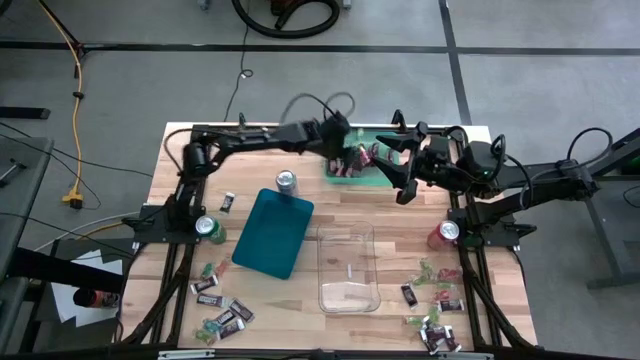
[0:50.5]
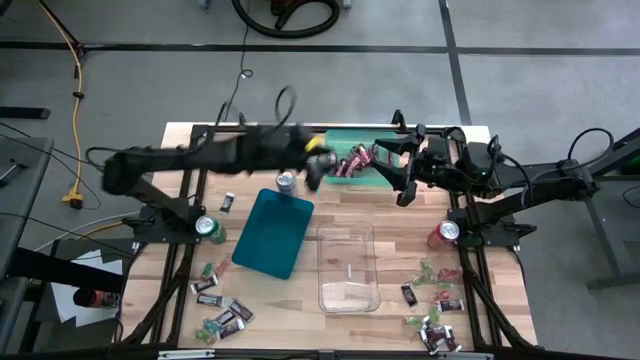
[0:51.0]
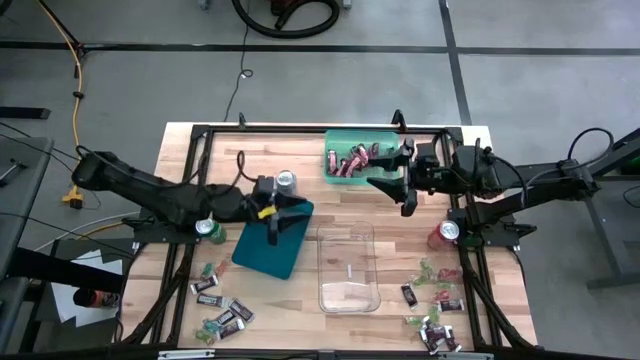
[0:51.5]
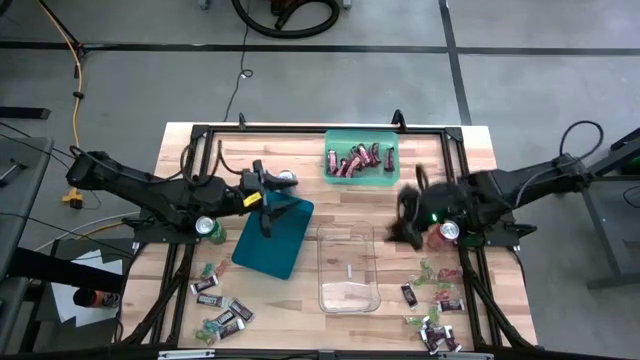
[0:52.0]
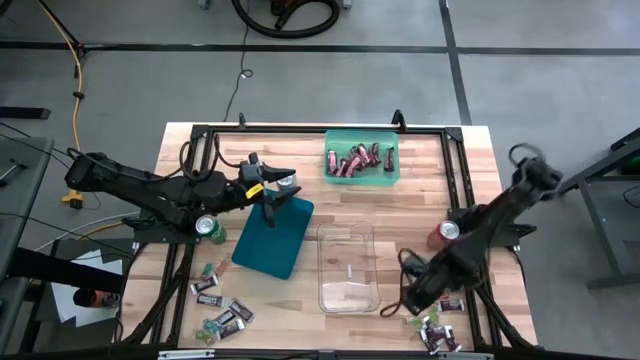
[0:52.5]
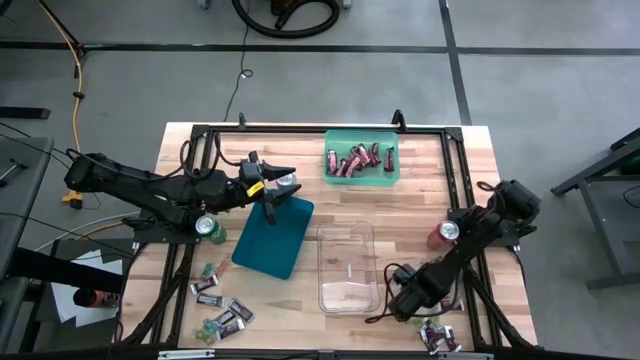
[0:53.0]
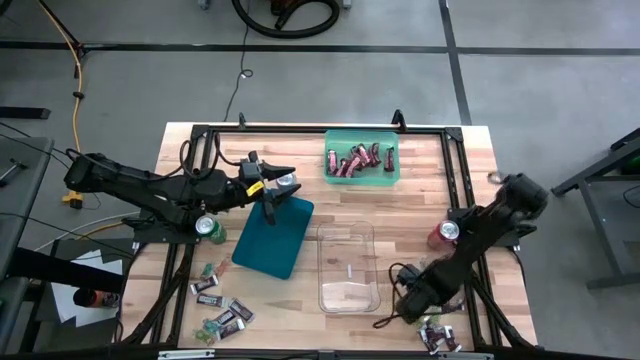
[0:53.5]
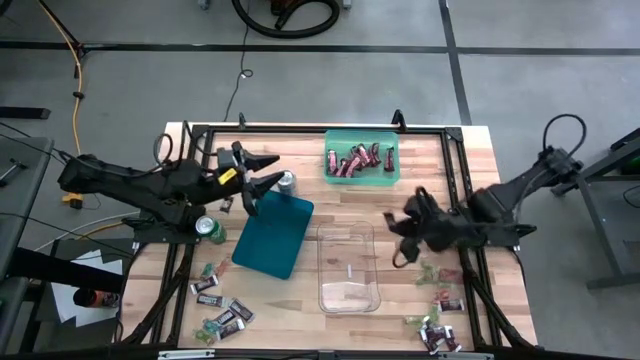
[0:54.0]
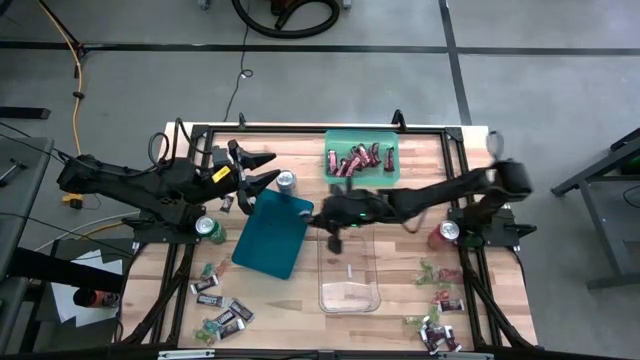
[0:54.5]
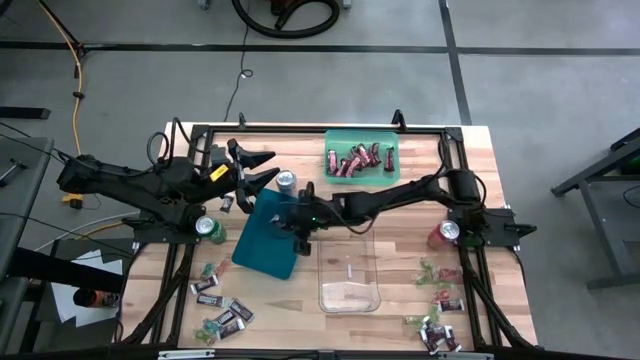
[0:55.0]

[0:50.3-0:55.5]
Task: Sort candy
Put the chocolate bar into the blue bin

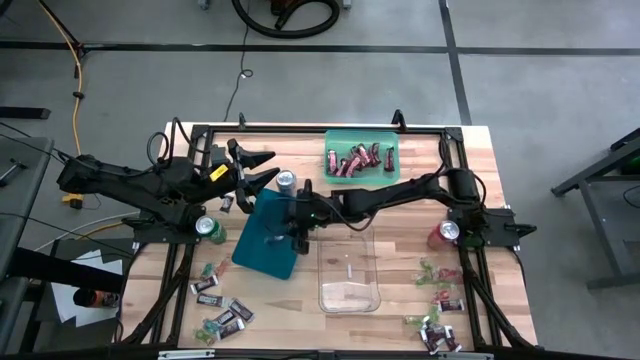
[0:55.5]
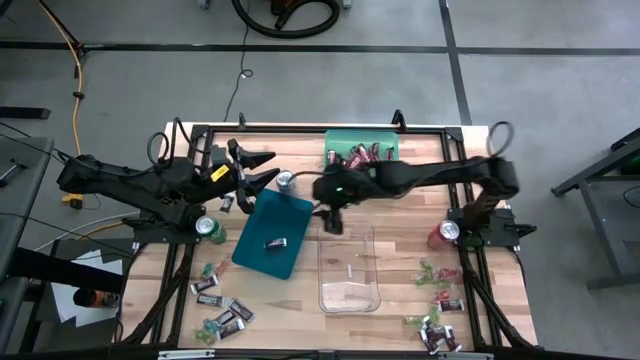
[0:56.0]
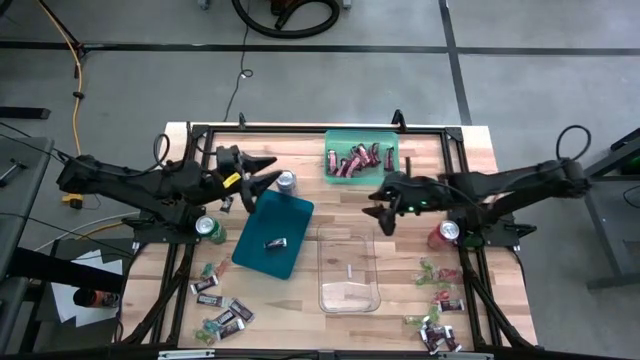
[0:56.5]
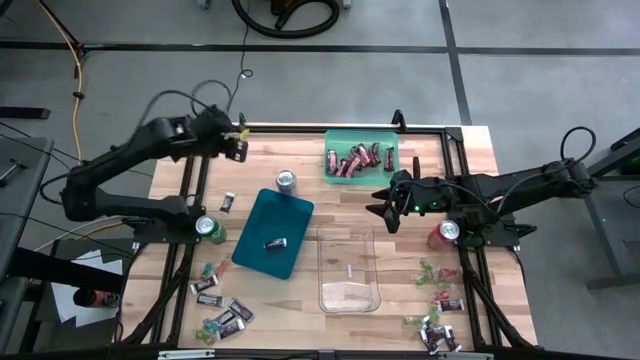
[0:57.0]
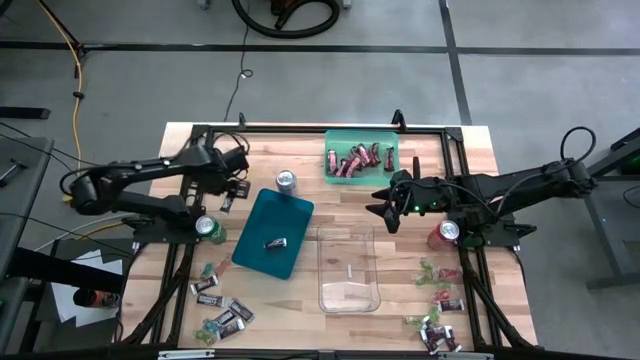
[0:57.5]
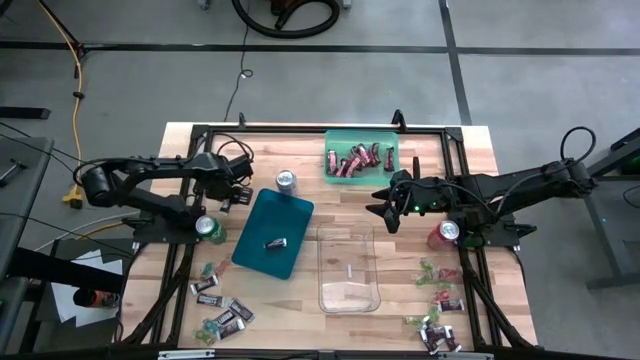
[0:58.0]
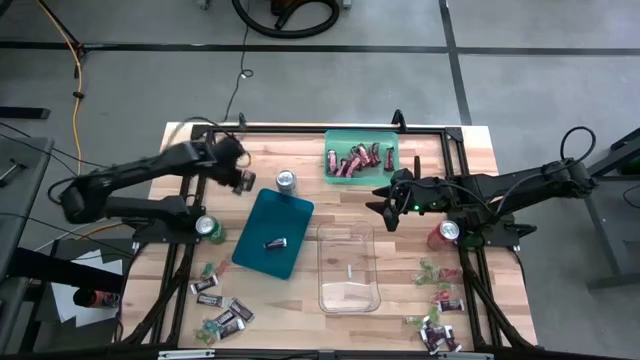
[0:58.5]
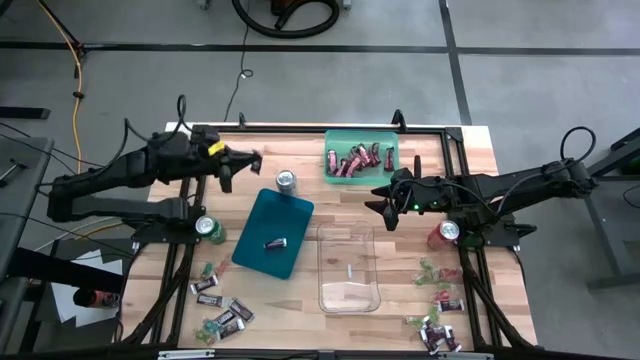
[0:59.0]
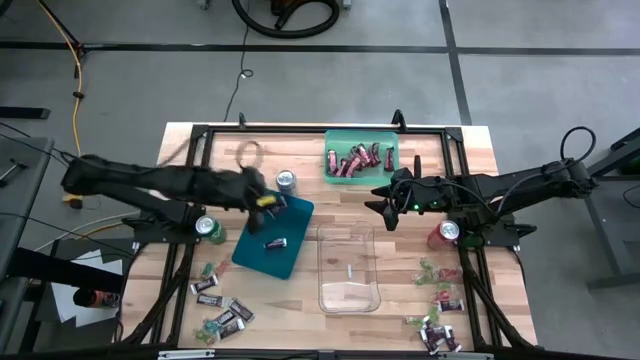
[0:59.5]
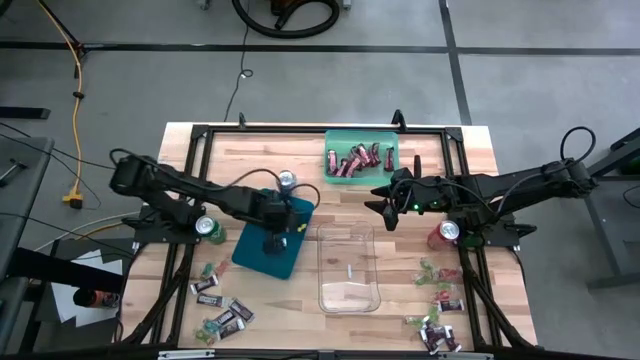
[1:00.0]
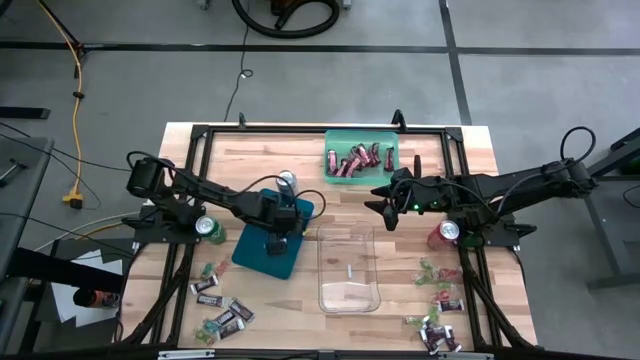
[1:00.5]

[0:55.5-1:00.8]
Put the chocolate bar into the blue bin

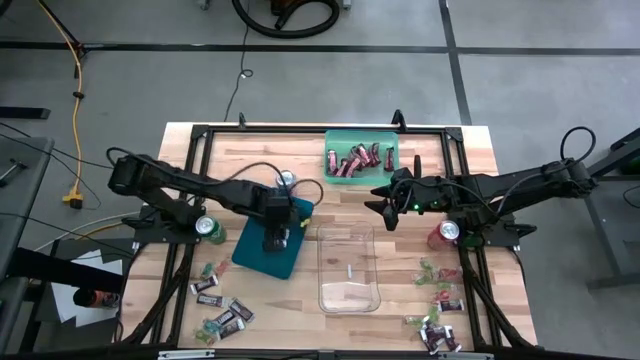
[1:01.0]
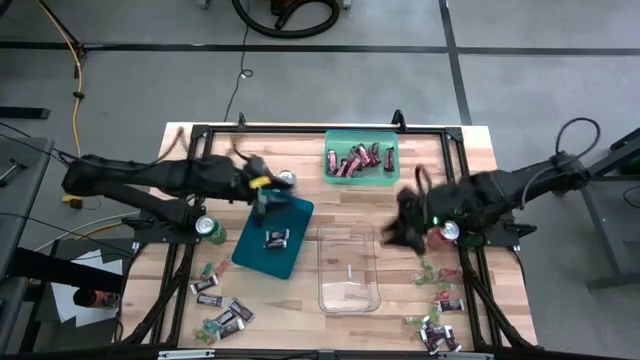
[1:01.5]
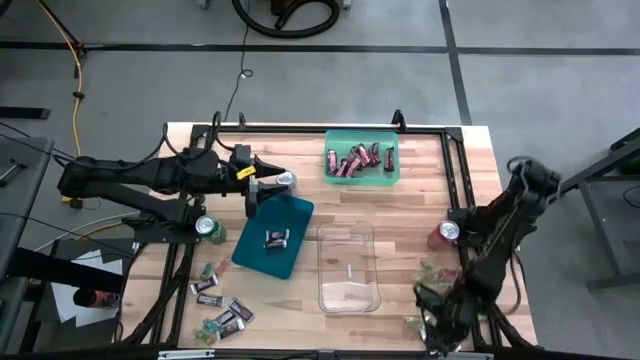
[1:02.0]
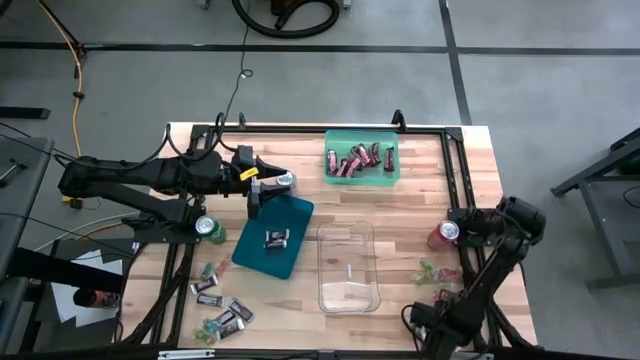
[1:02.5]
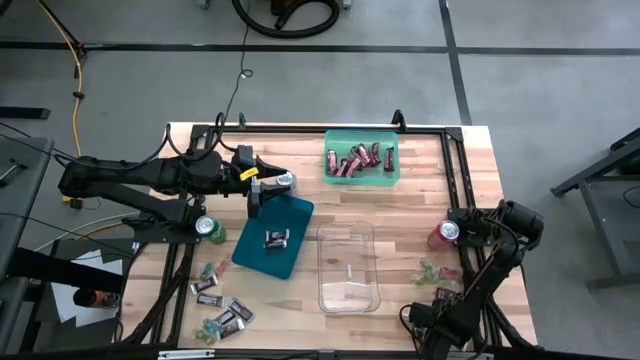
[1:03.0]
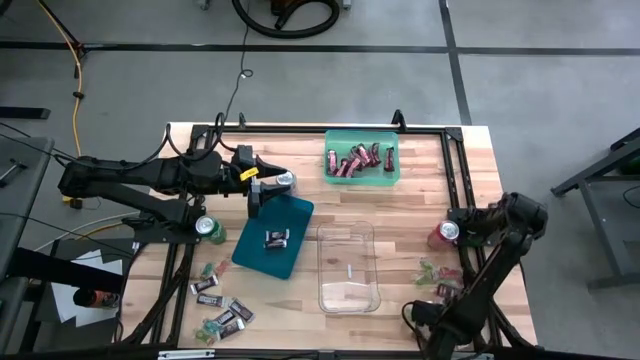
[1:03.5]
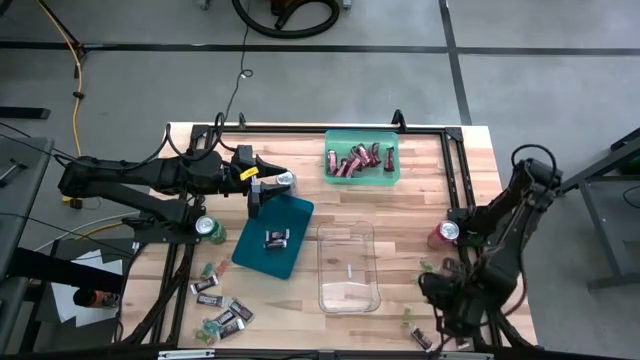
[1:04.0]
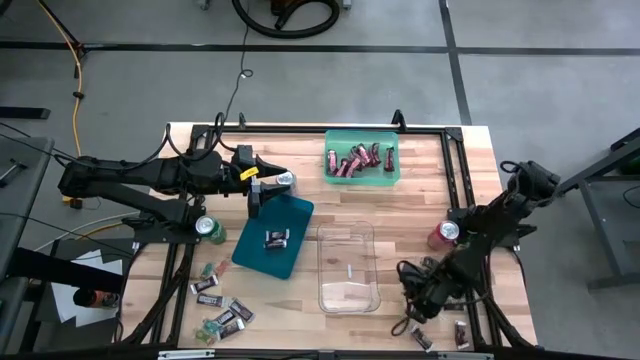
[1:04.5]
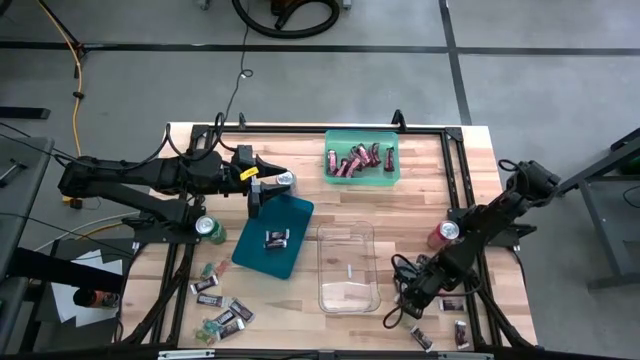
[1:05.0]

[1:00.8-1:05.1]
Put the chocolate bar into the blue bin

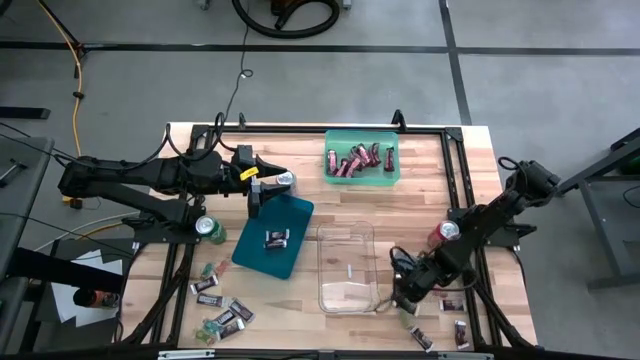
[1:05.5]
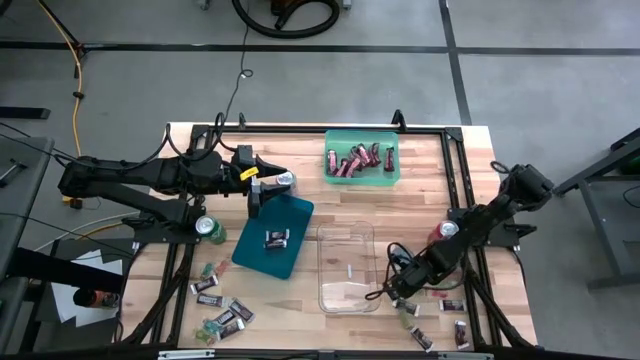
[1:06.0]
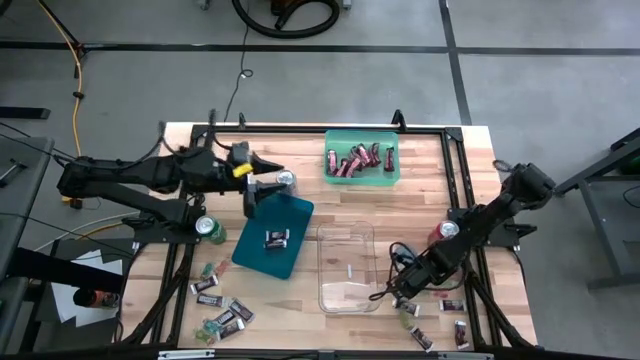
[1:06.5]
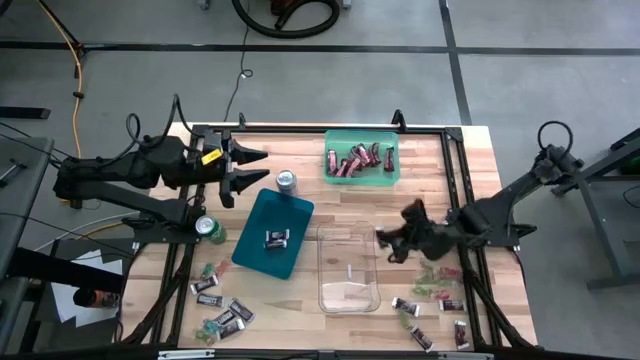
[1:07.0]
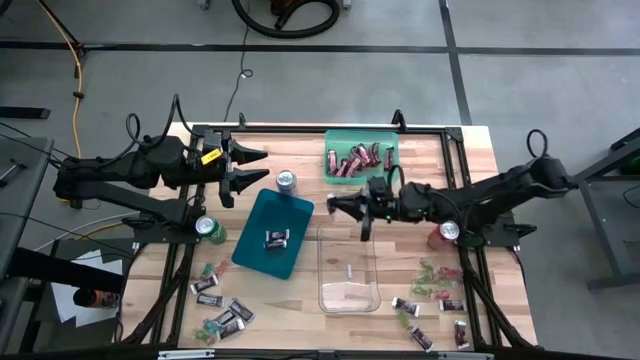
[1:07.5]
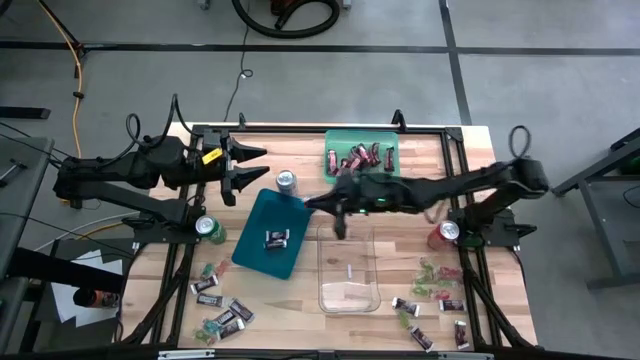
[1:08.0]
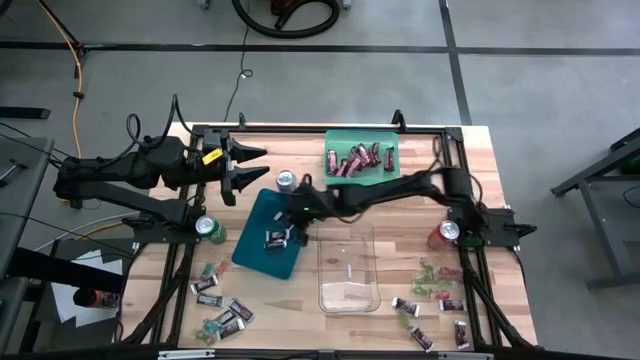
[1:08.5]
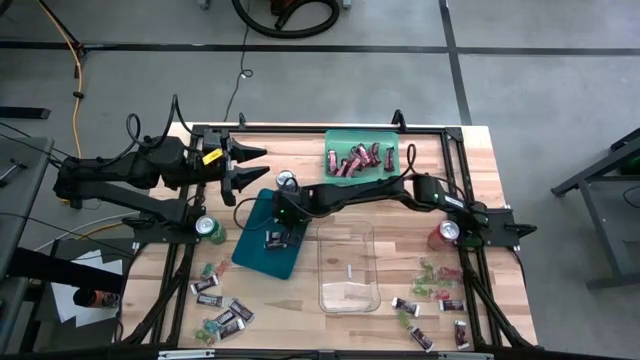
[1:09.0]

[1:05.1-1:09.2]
Put the chocolate bar into the blue bin

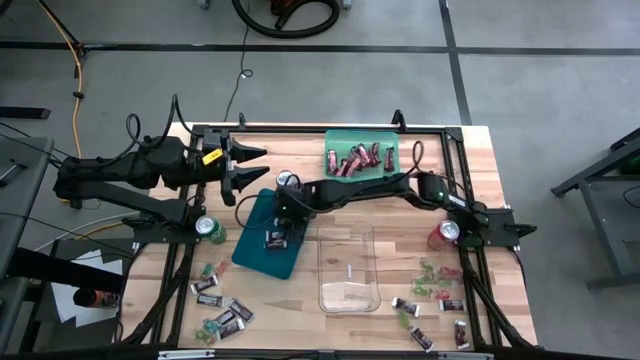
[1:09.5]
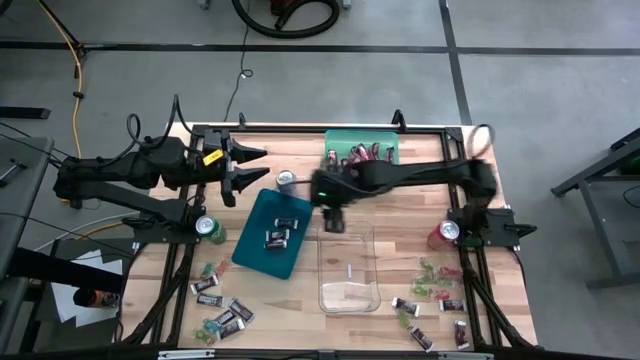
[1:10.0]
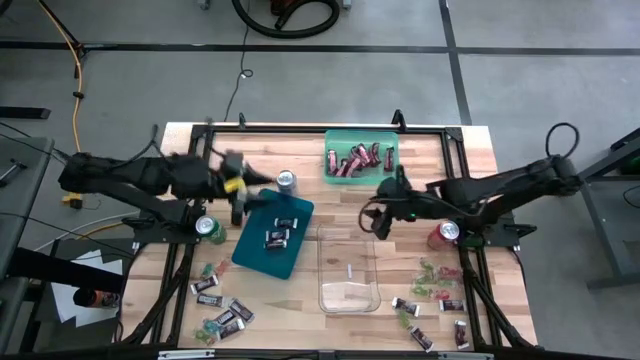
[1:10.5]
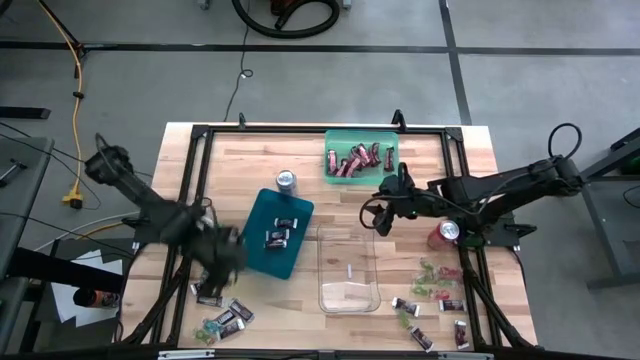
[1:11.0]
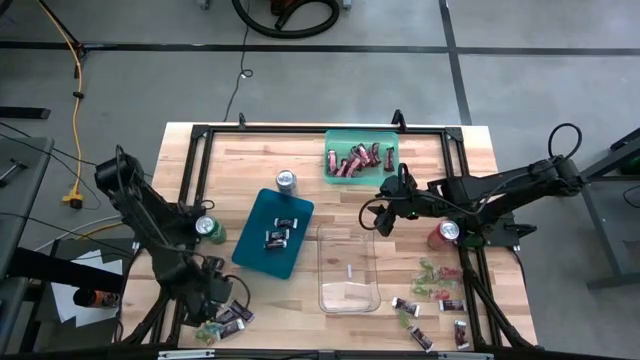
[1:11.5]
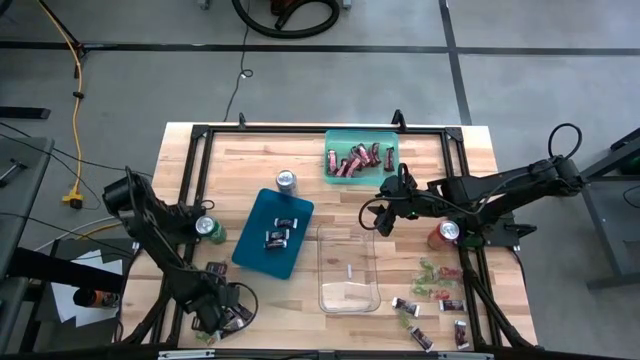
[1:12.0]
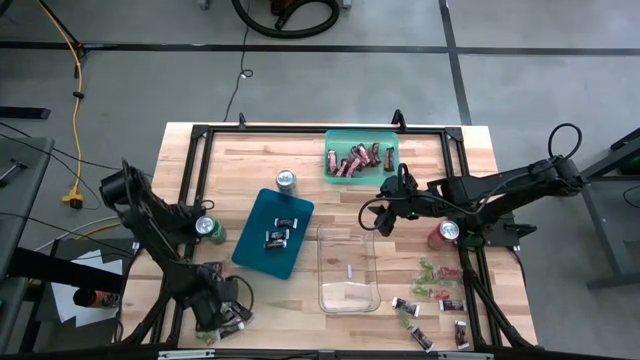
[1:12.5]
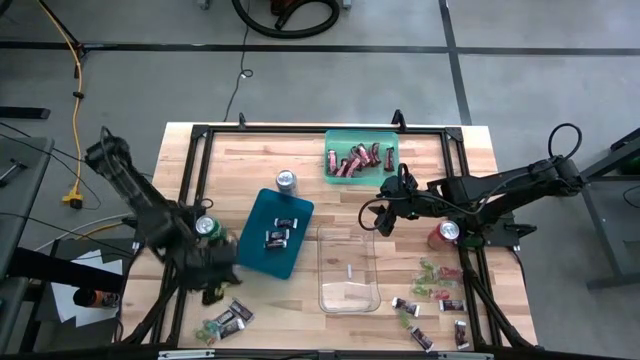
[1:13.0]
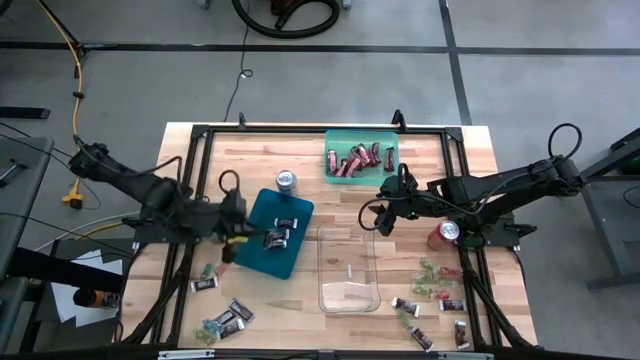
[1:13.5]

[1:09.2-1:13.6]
Put the chocolate bar into the blue bin
